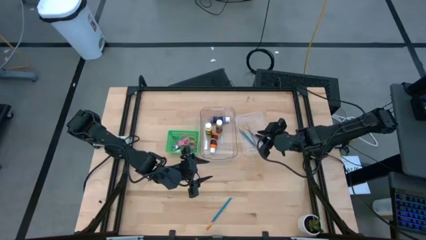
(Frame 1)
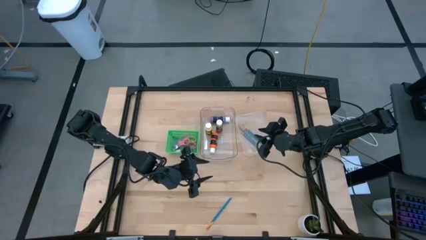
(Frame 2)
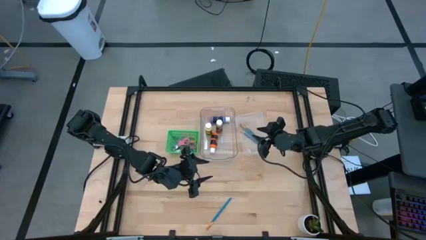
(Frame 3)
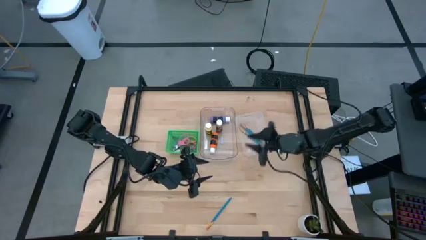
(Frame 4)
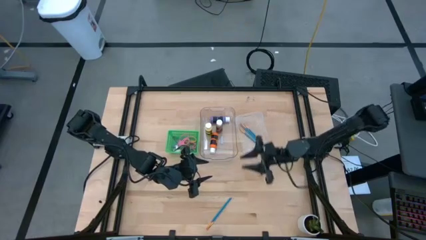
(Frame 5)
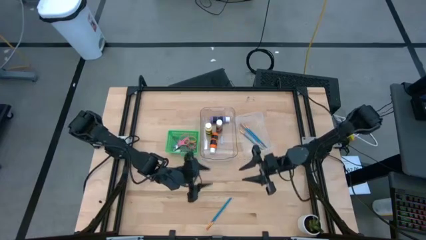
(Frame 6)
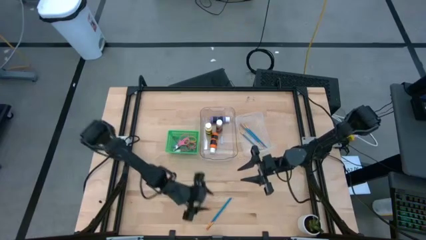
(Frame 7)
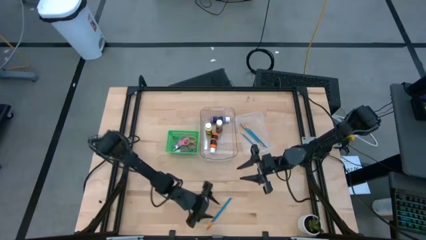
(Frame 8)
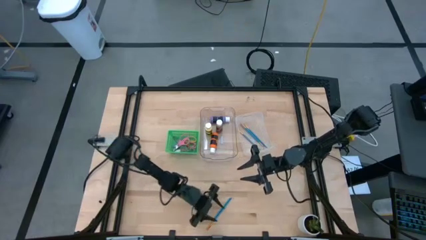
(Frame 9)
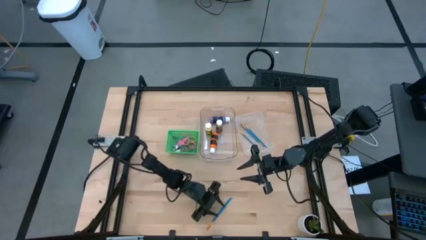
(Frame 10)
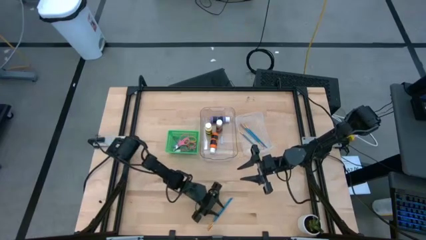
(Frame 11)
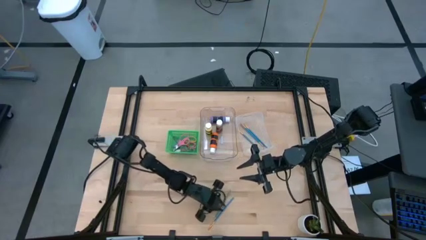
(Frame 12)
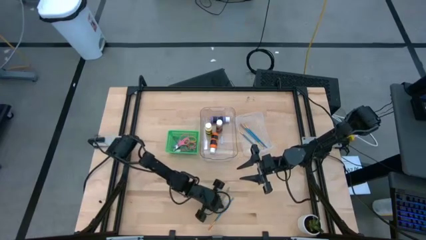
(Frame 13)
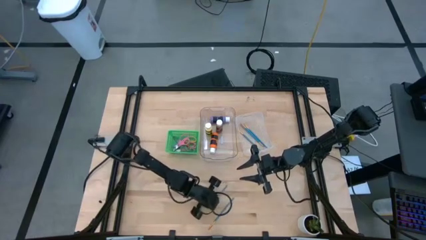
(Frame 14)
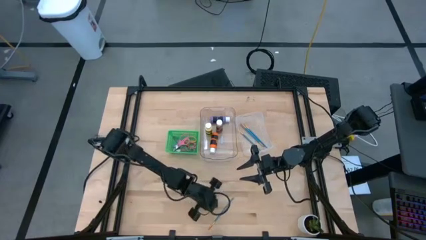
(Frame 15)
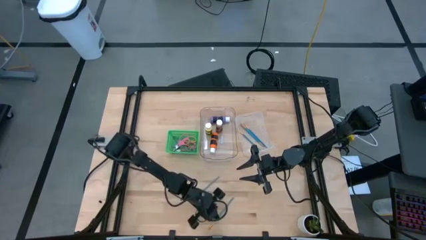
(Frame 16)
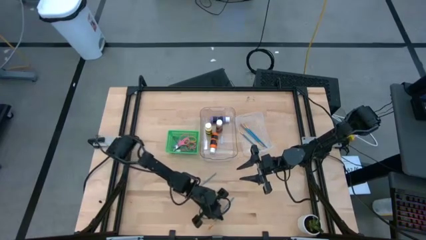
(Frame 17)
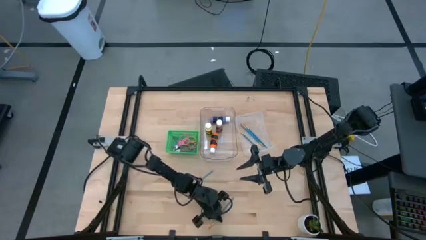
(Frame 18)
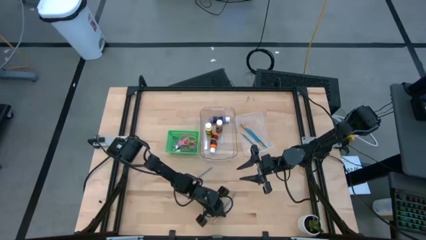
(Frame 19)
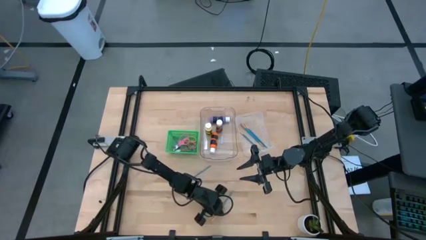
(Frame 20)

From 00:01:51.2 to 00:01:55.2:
Task: Pick & Place Paint Supplies
Adjust the blue paint brushes on the table

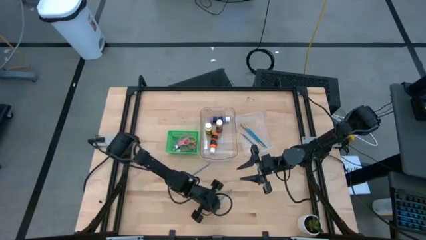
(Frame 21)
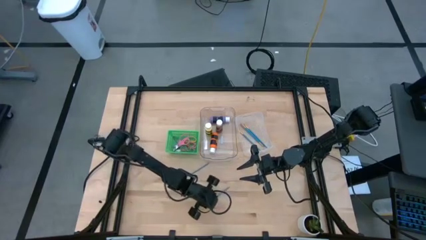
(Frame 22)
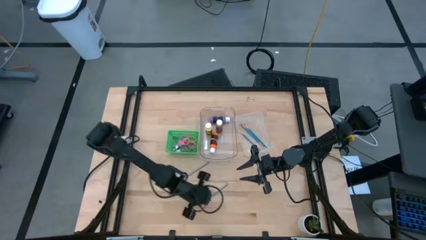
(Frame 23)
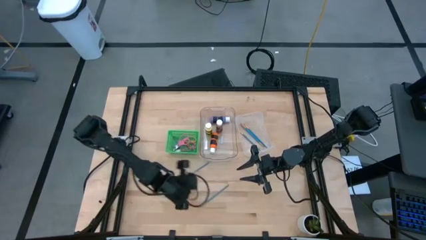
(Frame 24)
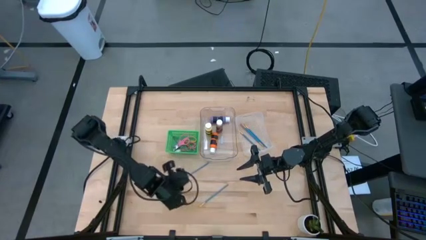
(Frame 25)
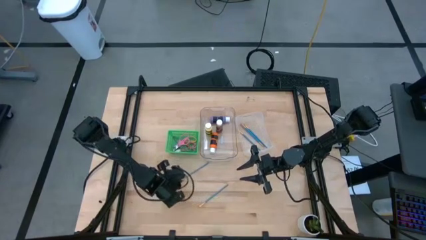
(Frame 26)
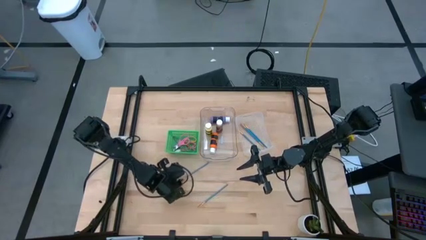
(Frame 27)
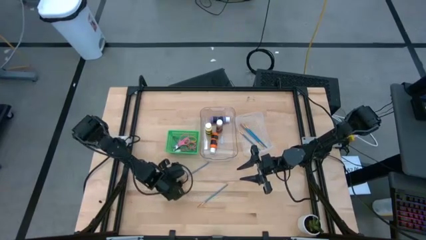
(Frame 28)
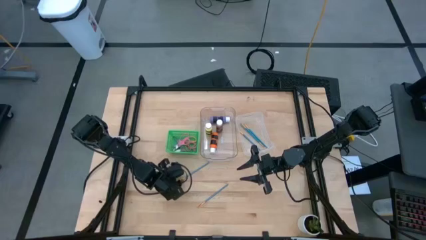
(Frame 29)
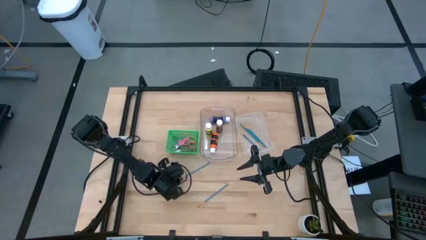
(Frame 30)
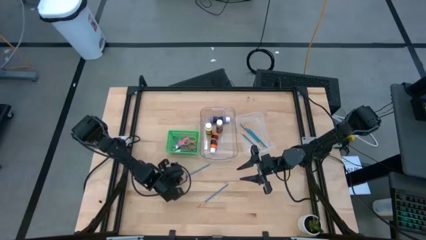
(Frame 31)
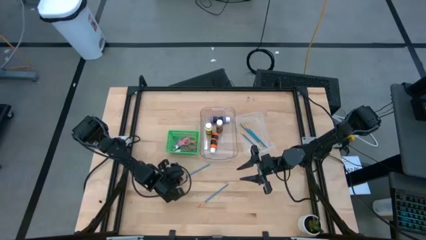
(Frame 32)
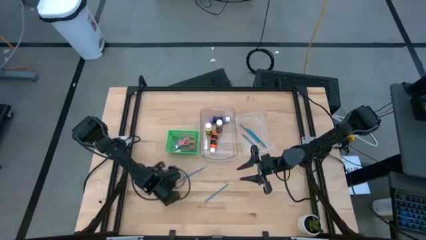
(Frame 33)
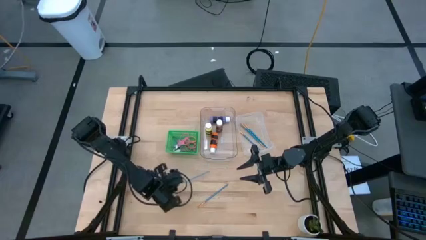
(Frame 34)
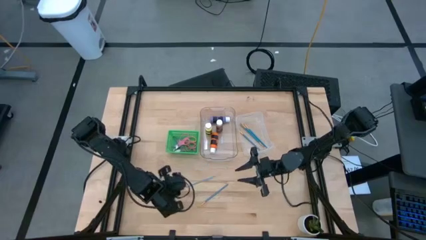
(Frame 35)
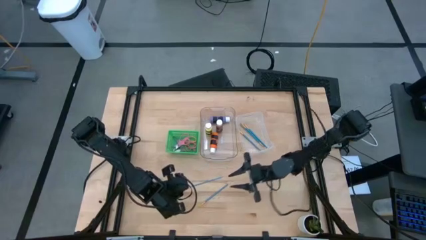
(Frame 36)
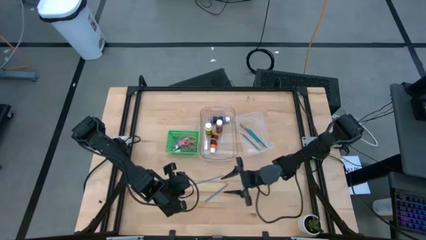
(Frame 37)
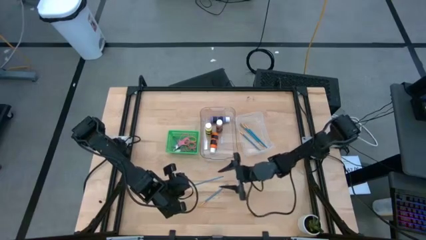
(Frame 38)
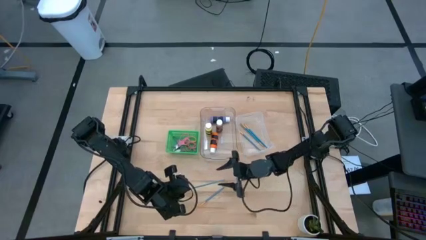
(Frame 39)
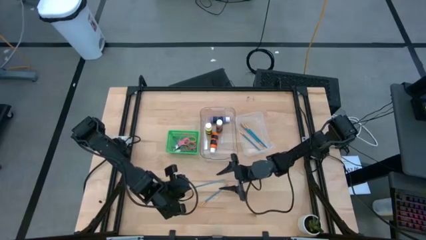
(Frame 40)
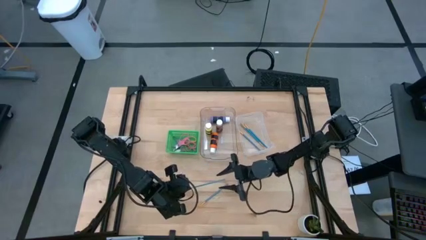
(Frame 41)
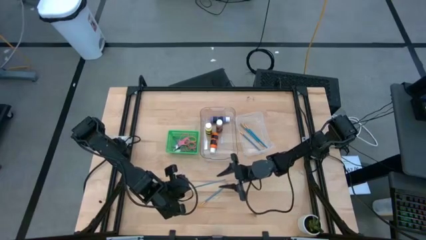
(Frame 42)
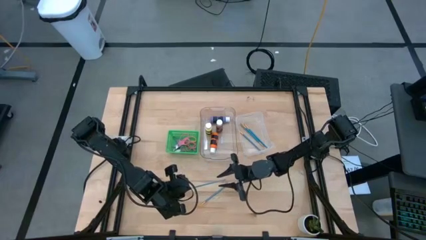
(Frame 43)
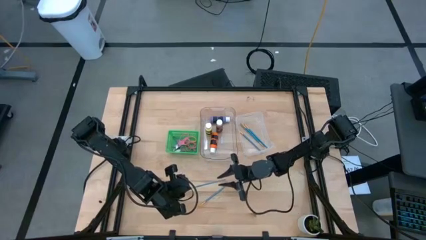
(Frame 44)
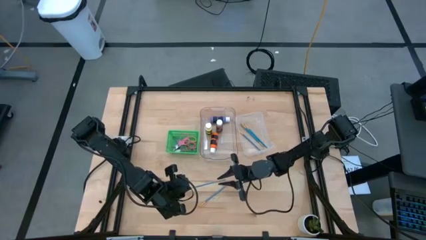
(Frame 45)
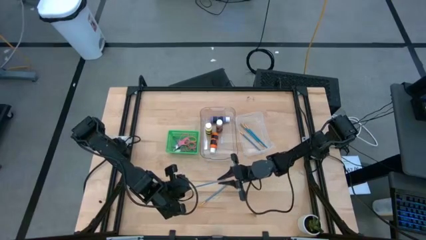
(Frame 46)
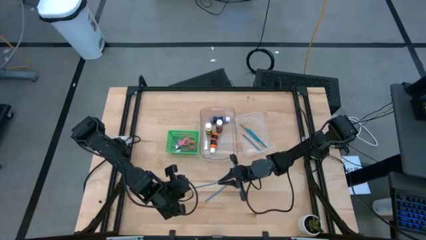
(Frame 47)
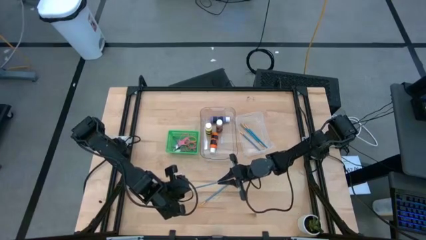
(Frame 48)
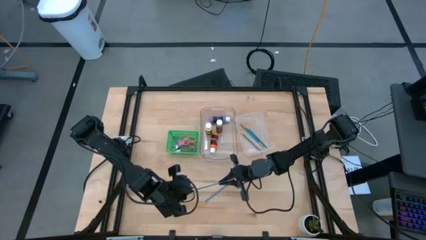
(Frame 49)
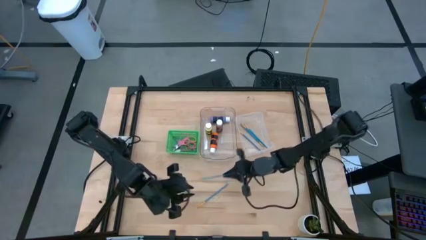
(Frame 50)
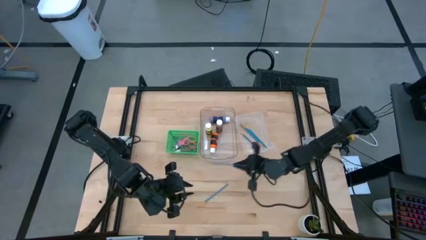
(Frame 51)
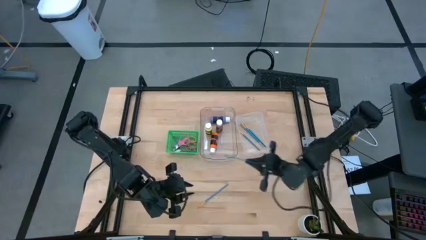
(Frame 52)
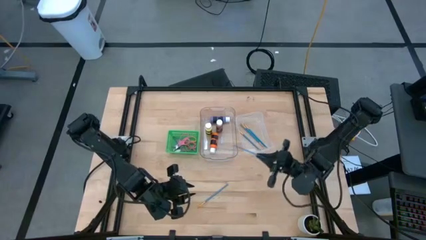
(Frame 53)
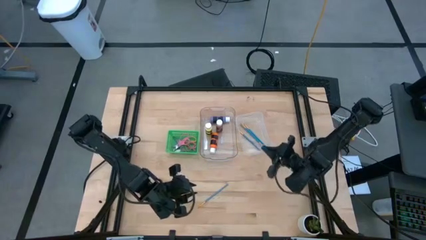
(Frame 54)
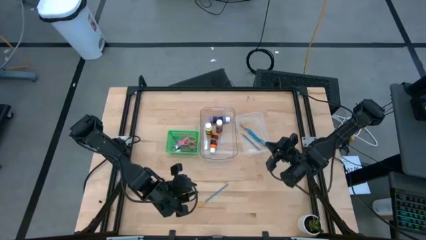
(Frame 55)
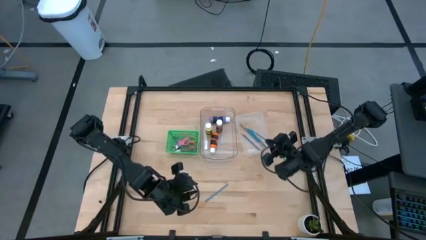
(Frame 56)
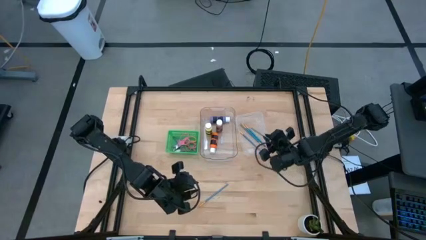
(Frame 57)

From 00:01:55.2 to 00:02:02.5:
Put the blue paint brush into the white bin

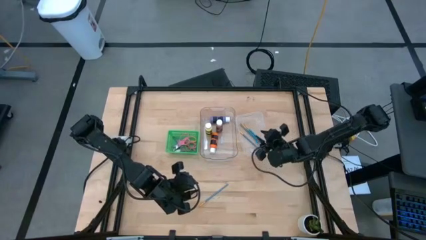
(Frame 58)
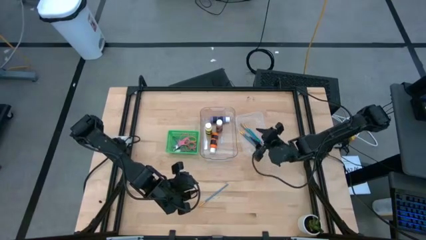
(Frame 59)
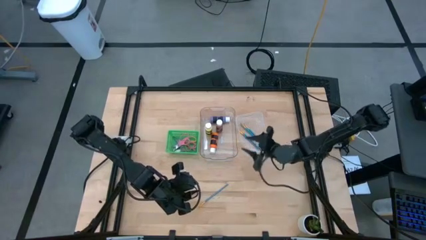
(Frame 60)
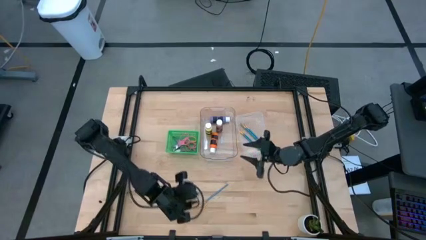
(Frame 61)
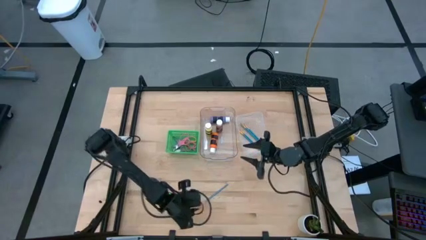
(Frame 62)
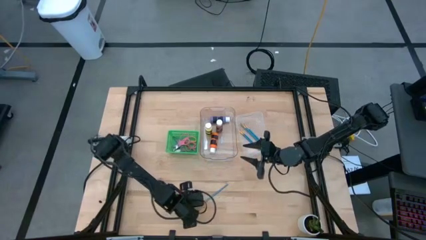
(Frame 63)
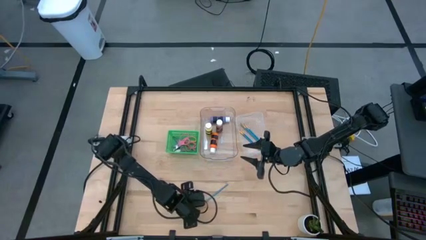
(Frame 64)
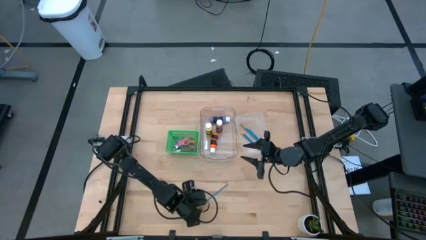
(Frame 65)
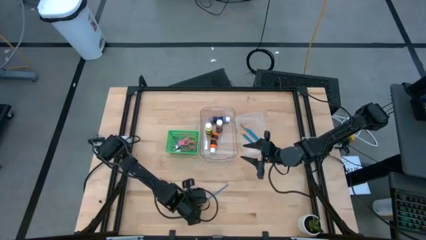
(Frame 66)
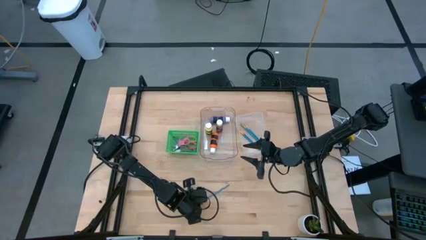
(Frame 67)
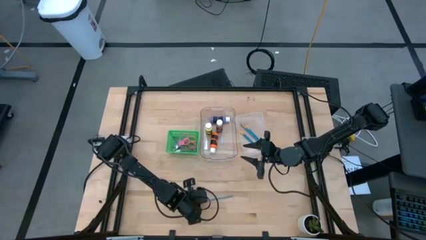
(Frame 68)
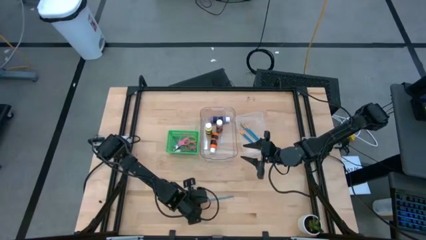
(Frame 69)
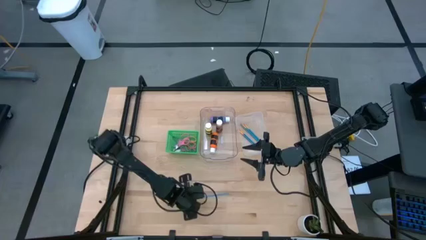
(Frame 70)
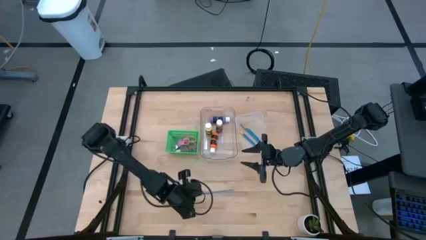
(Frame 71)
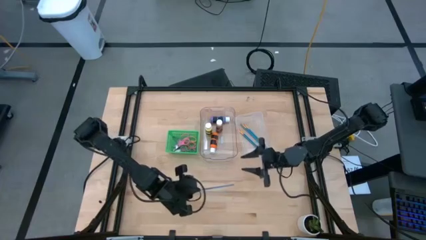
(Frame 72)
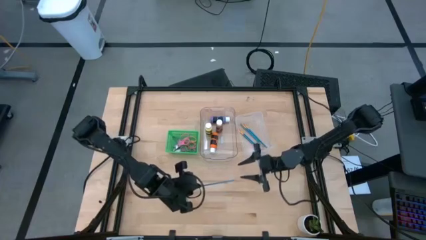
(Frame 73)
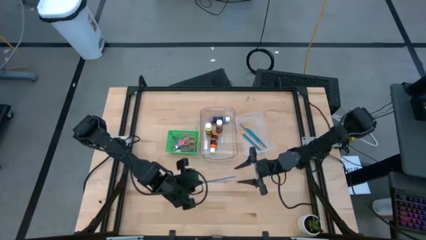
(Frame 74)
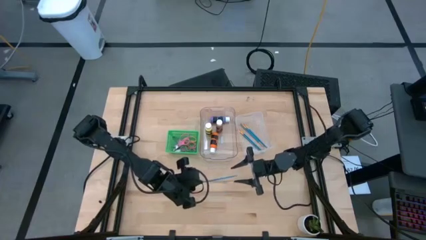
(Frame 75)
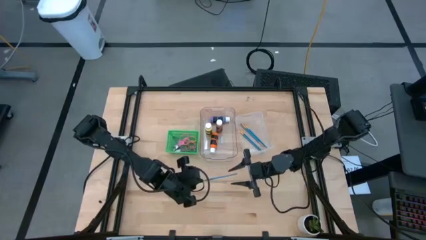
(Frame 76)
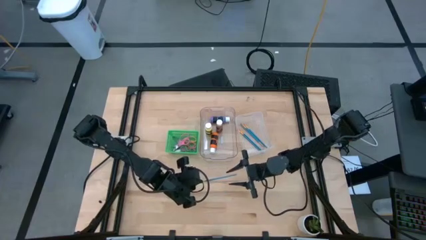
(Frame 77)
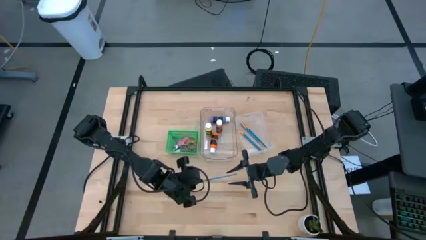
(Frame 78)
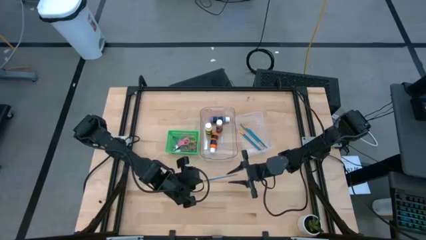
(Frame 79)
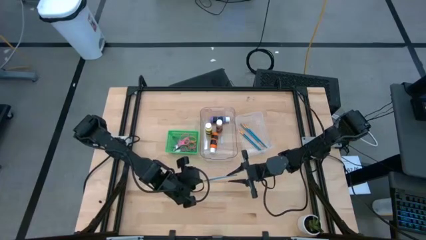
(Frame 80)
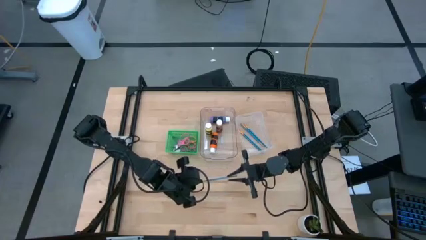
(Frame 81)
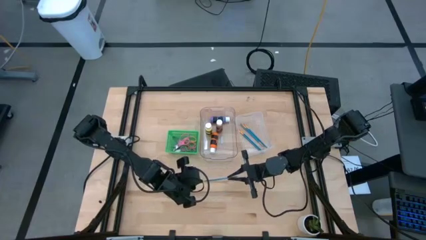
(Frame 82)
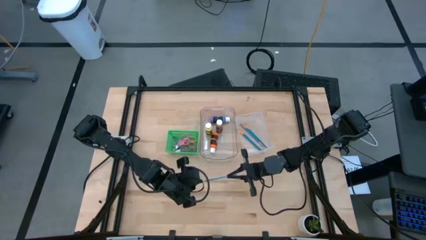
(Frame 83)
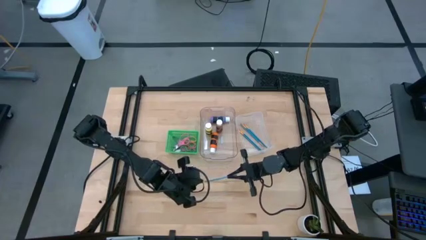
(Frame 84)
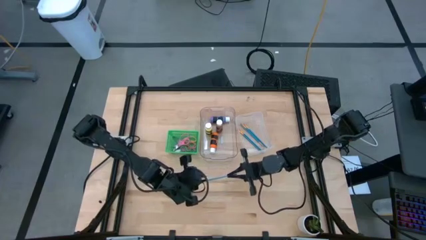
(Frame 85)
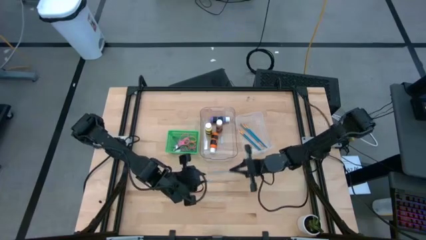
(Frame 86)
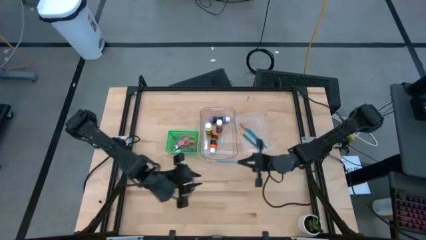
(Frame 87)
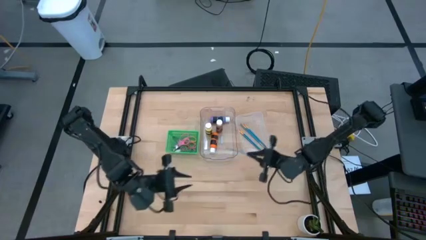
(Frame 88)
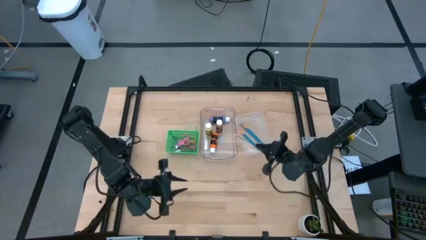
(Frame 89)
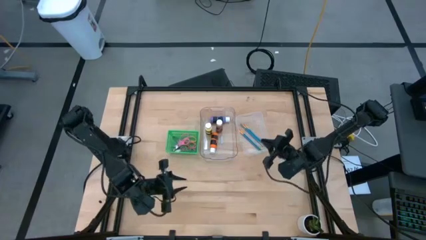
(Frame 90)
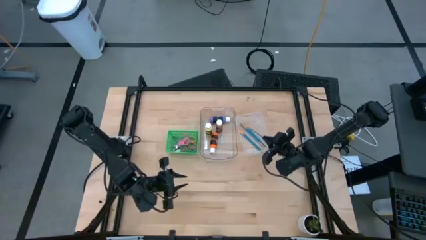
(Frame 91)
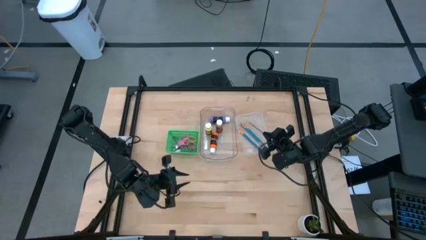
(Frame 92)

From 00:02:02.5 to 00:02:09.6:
Put the blue paint brush into the white bin
